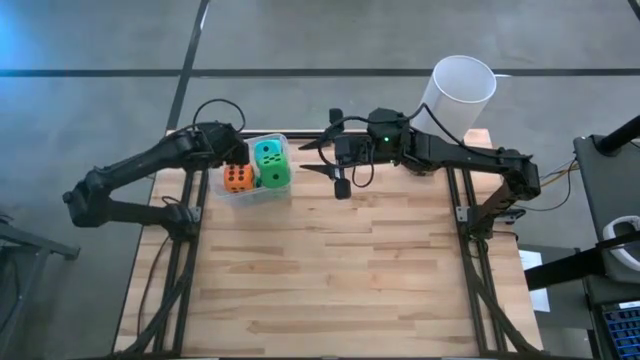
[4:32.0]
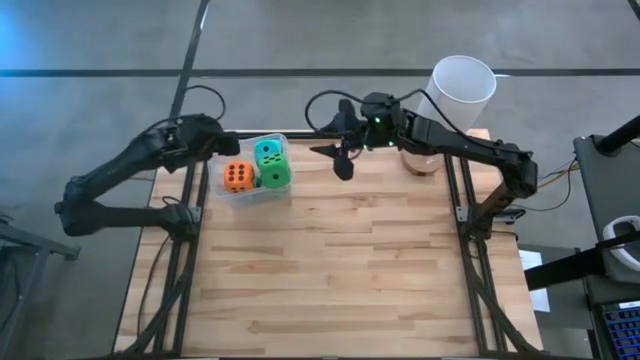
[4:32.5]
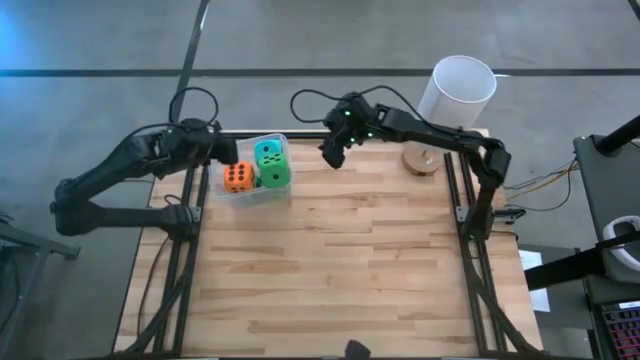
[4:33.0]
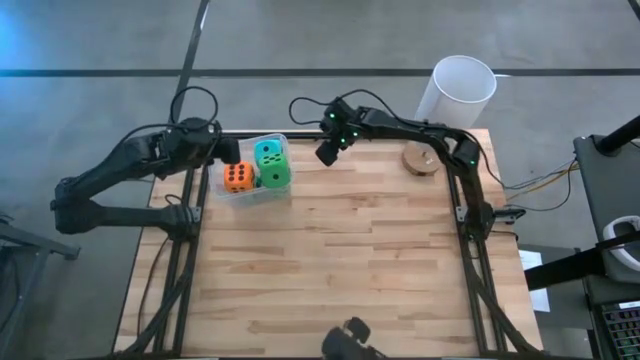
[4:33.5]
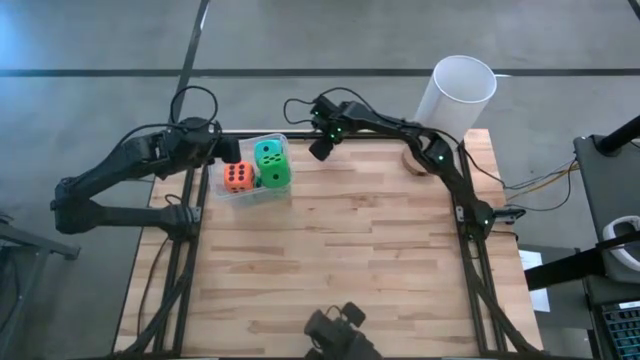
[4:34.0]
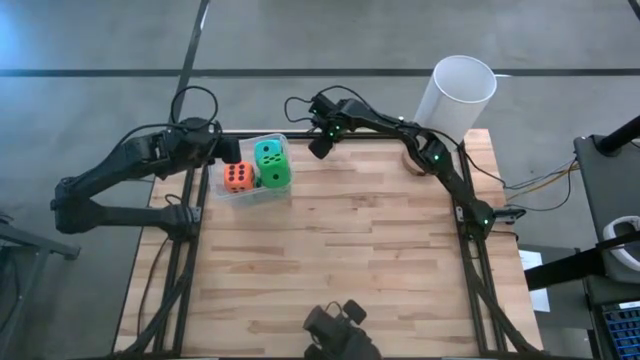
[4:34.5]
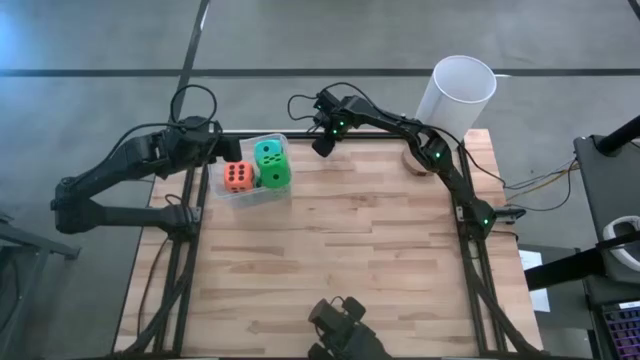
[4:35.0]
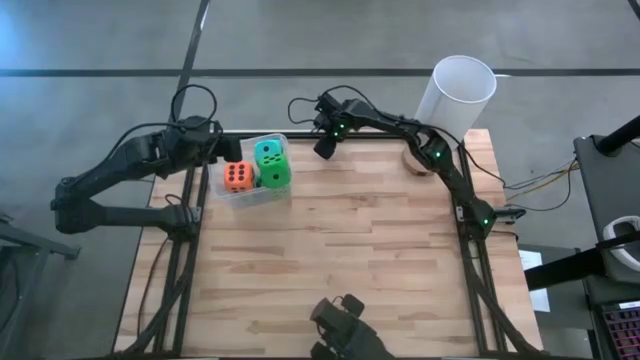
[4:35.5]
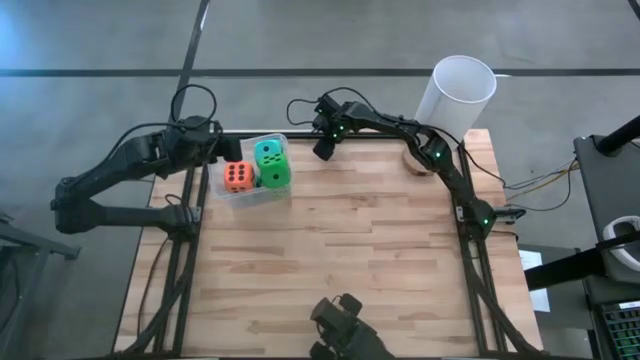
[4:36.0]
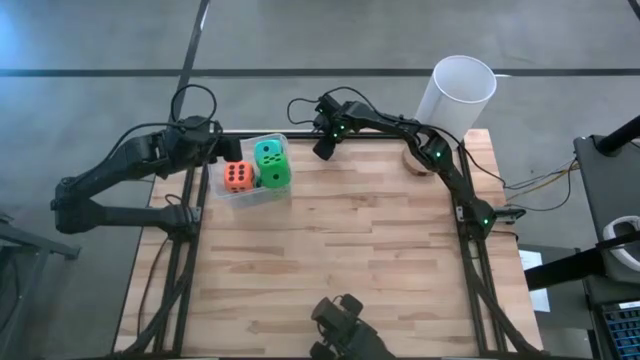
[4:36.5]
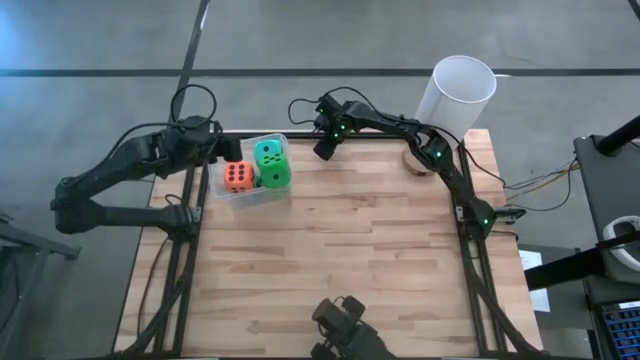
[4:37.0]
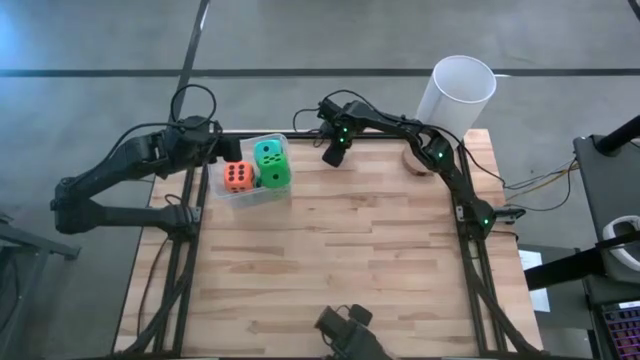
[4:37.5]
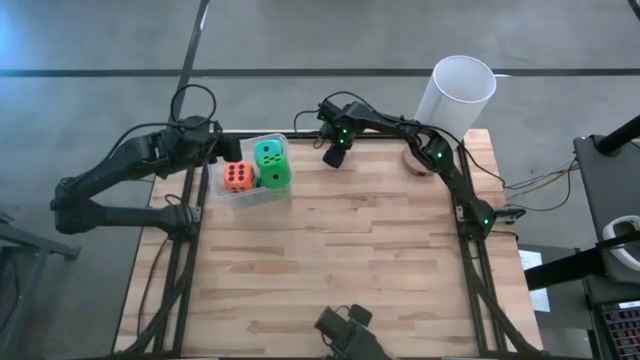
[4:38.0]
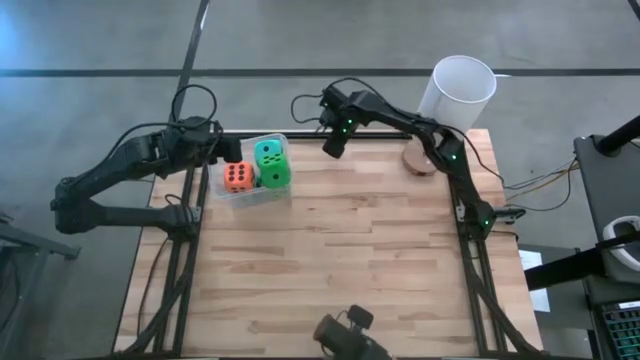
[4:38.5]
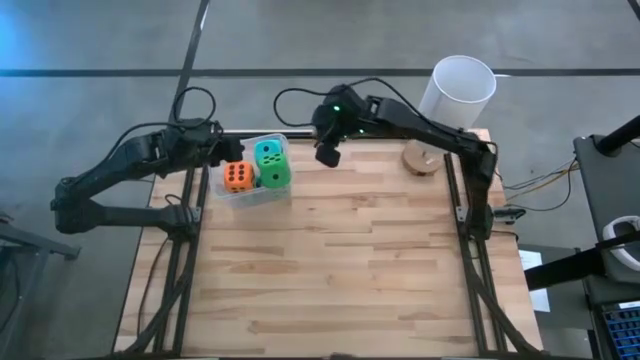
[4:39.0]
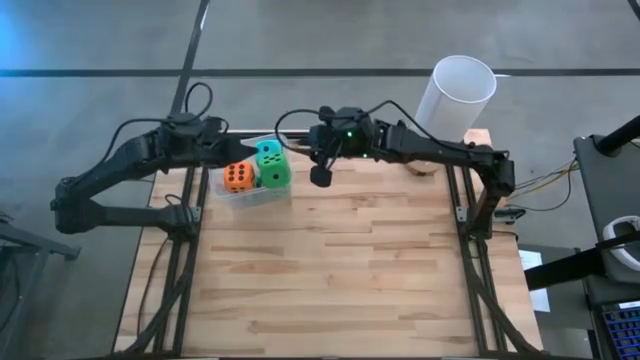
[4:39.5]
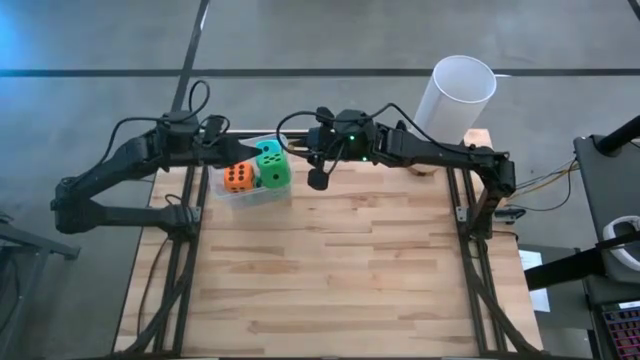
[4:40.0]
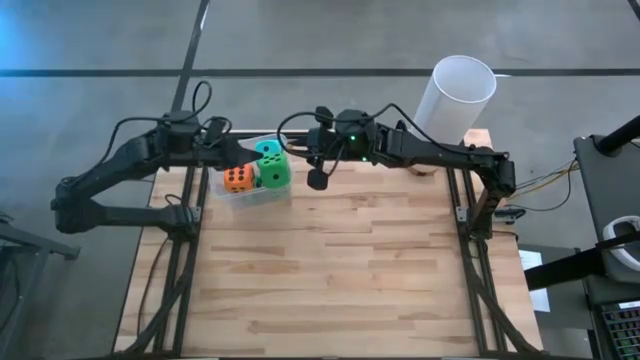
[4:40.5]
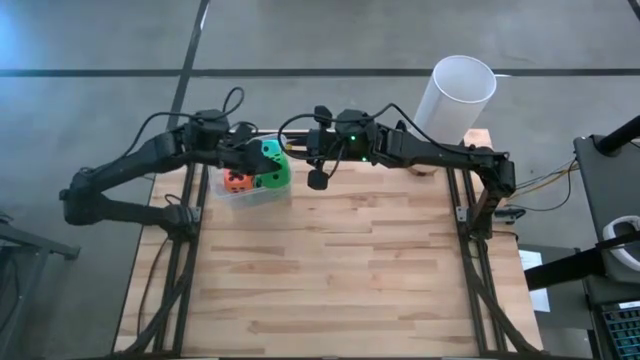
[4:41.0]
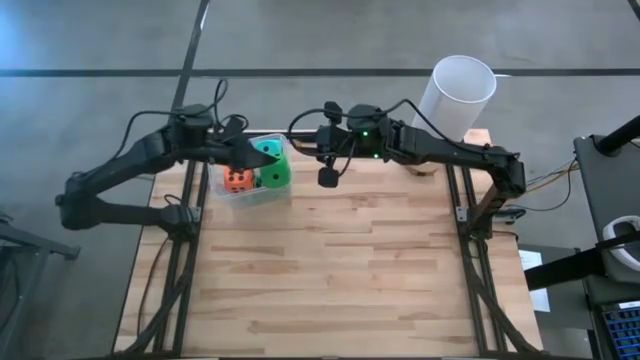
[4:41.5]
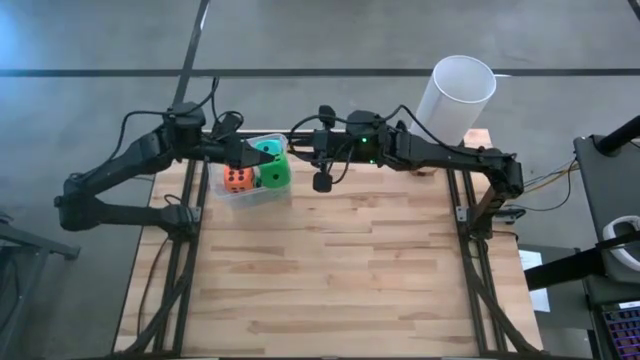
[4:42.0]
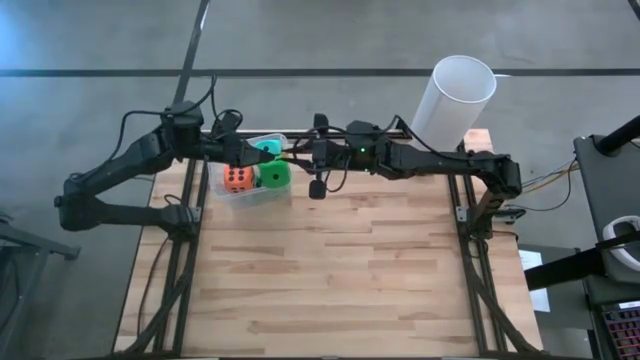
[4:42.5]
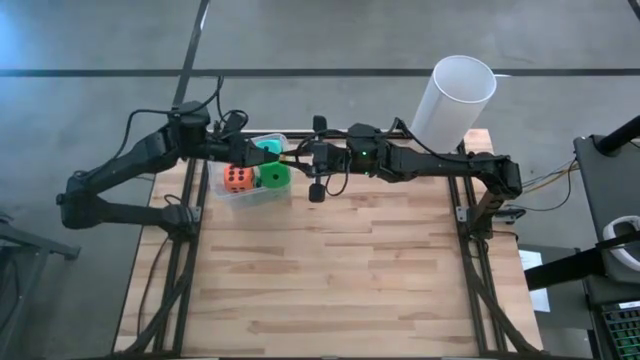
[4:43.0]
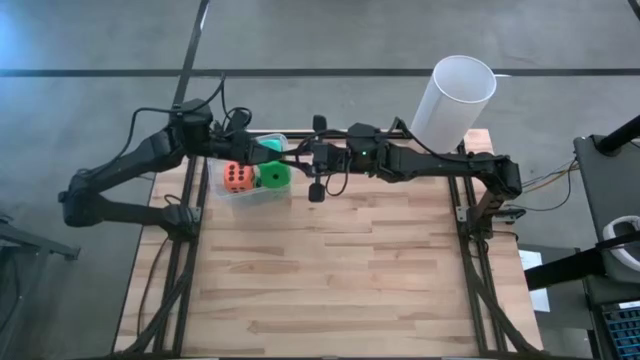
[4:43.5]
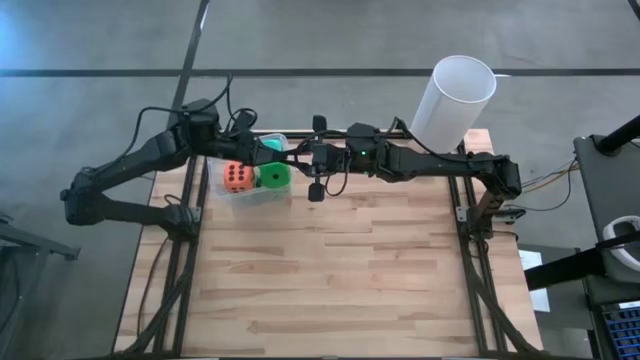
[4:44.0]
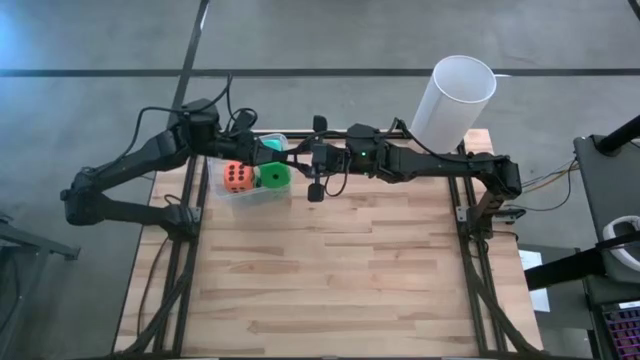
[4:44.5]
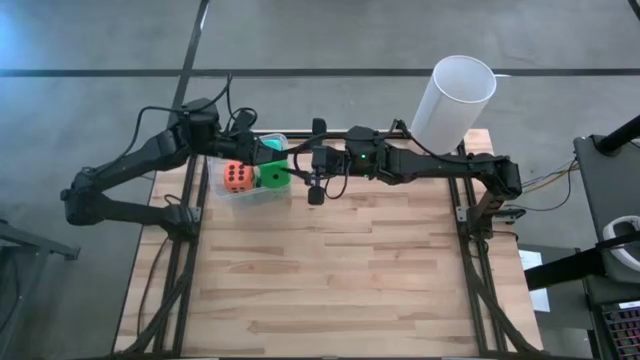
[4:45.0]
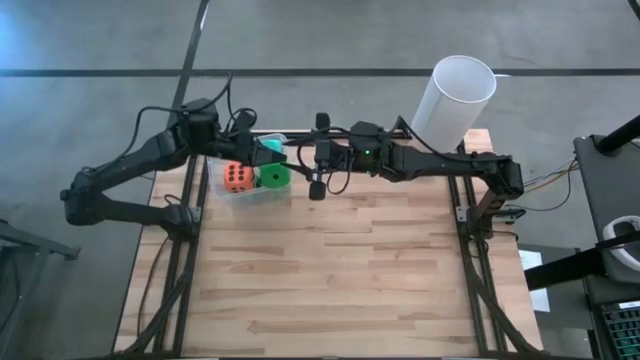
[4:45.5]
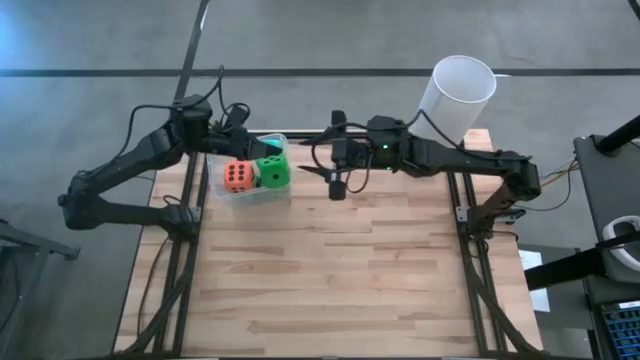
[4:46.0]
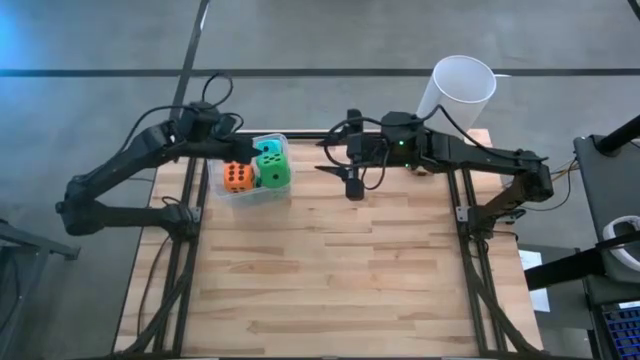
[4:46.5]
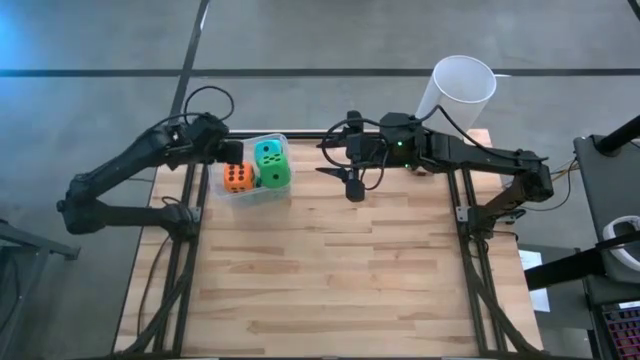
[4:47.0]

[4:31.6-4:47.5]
Task: Pick & Place Dice
Put the small yellow dice into the transparent bin

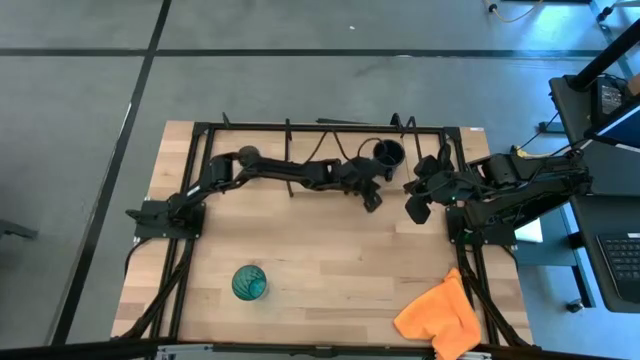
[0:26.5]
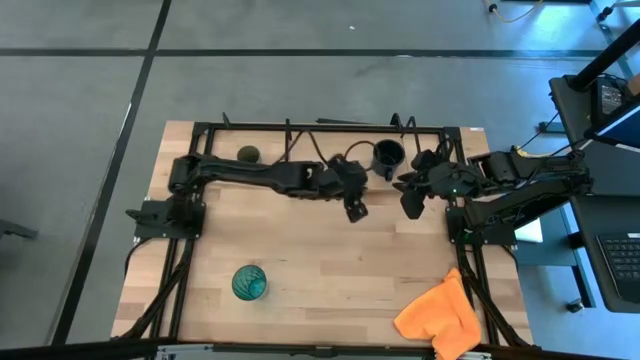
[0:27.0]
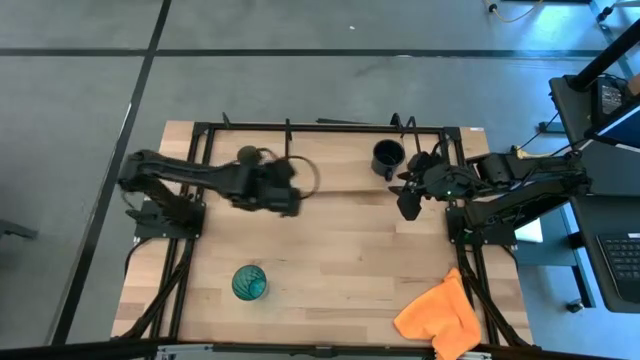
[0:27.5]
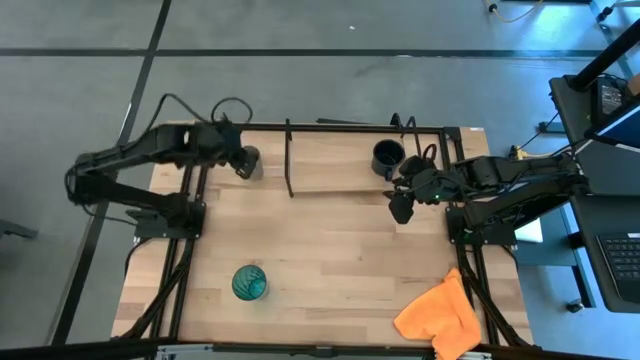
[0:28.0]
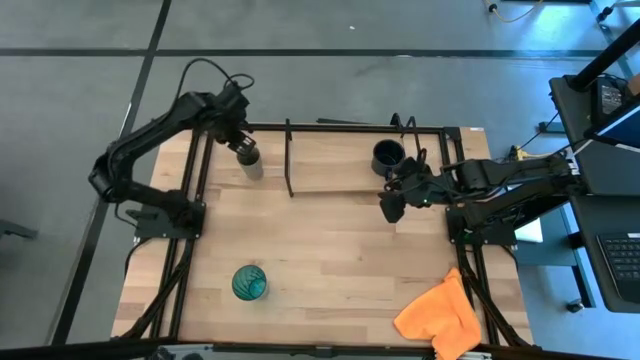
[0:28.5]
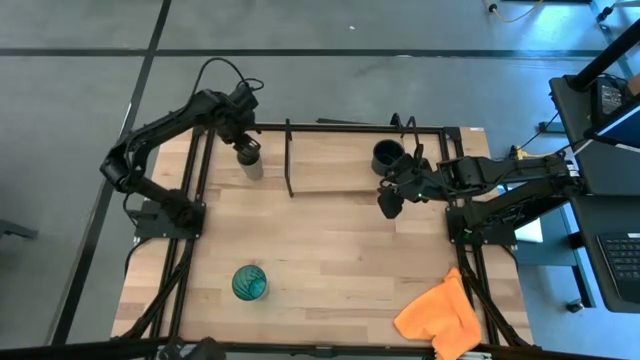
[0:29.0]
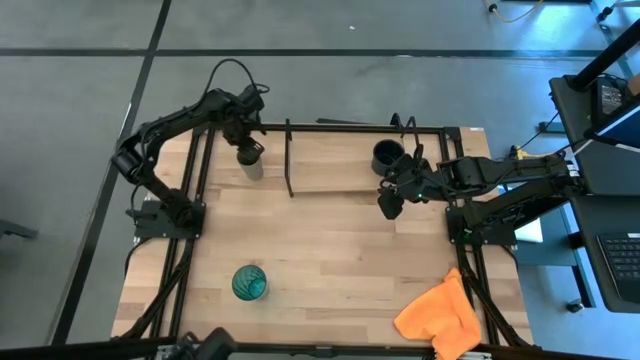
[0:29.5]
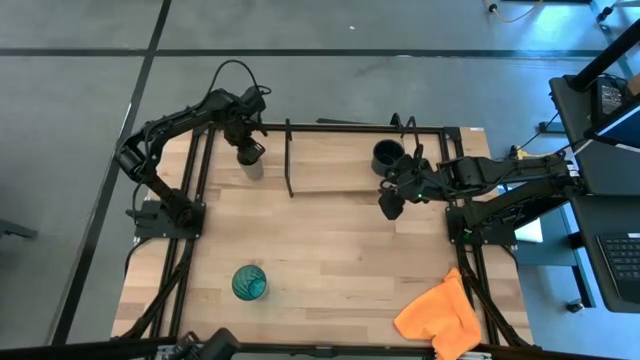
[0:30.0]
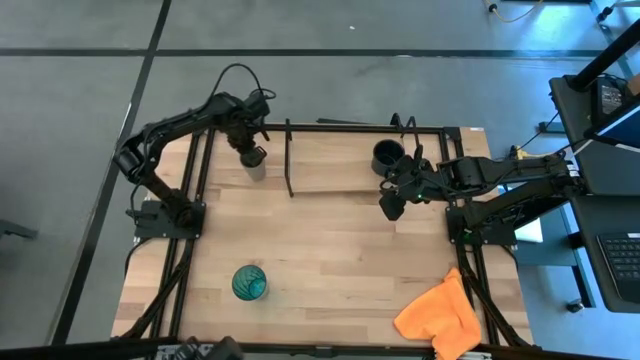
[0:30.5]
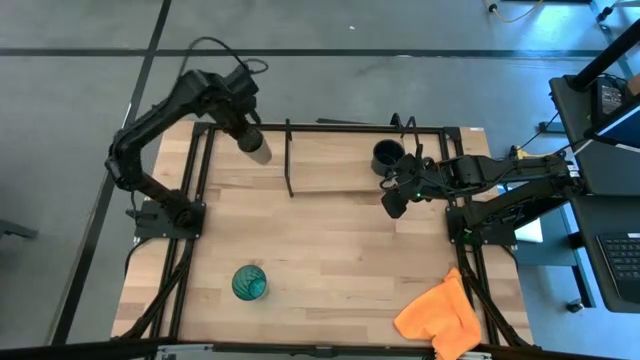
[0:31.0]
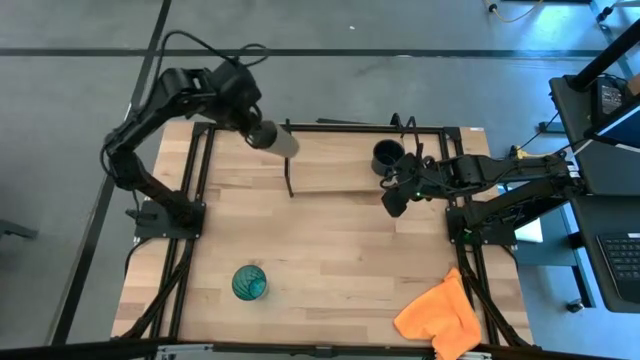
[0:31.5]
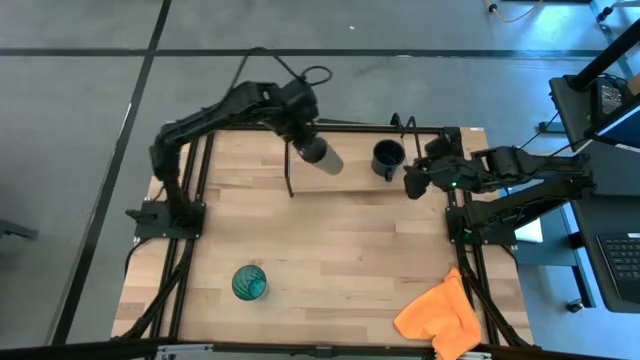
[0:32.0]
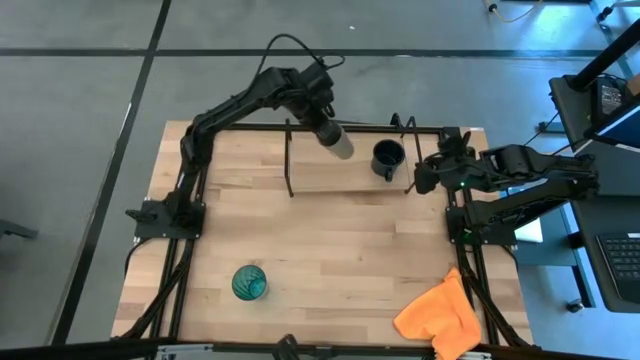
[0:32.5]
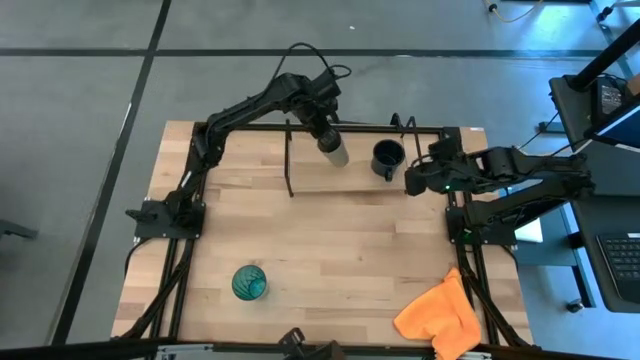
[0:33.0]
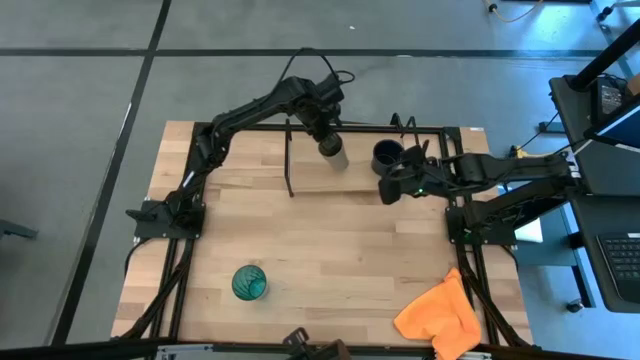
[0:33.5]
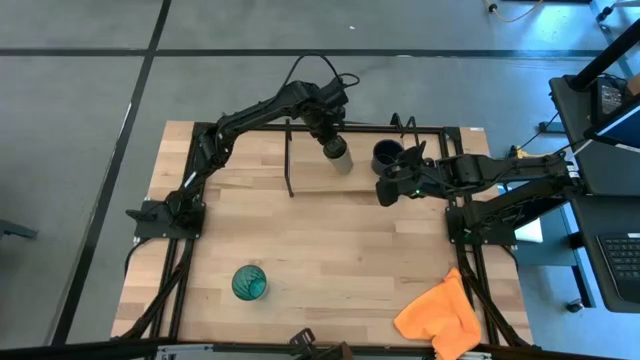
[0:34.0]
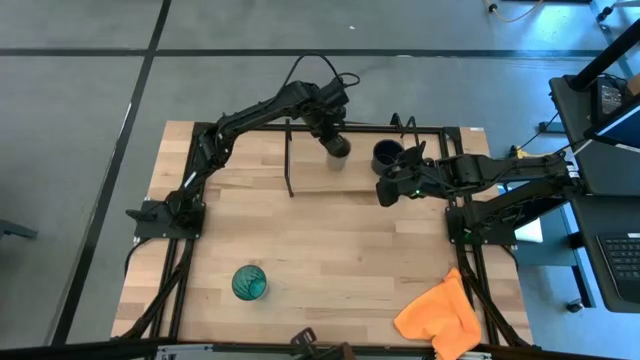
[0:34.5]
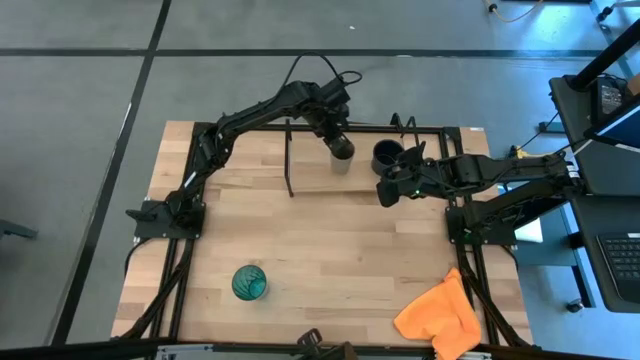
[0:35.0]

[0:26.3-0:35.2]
Task: Stack small to large cups/mugs on shelf
Put the grey cup on the shelf
